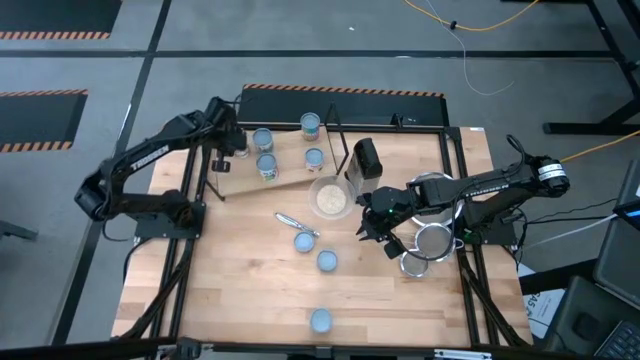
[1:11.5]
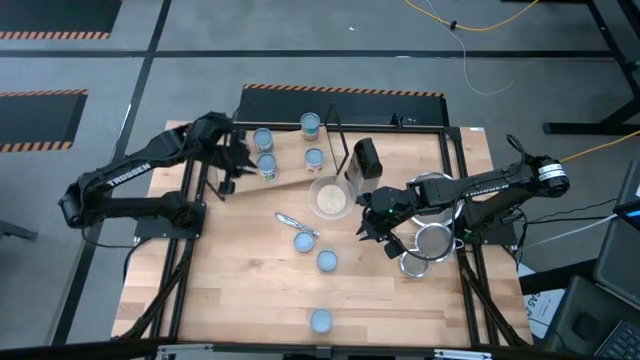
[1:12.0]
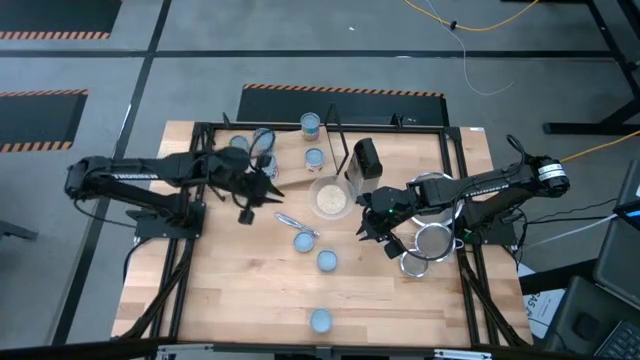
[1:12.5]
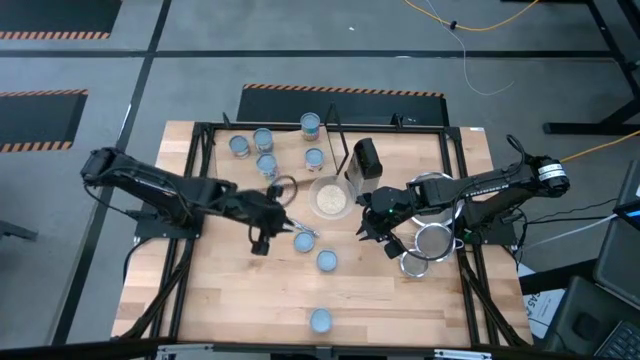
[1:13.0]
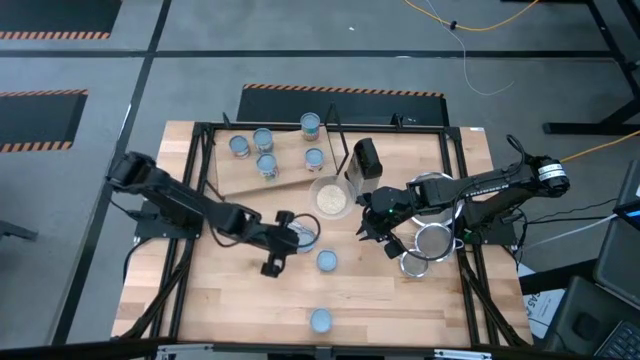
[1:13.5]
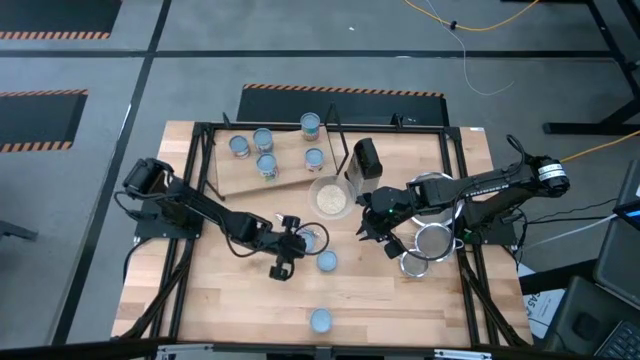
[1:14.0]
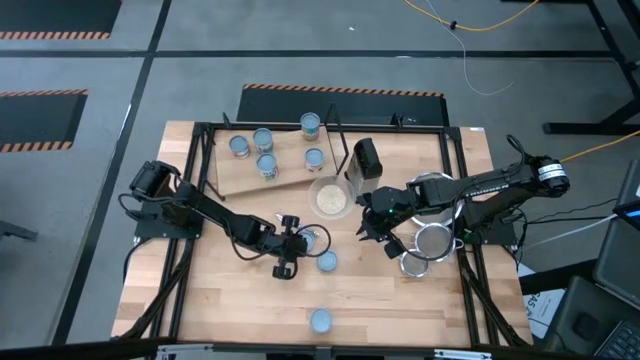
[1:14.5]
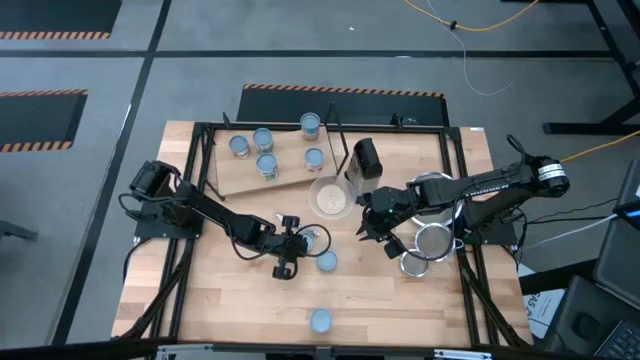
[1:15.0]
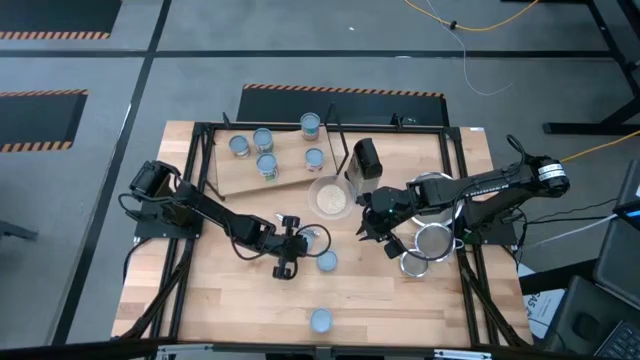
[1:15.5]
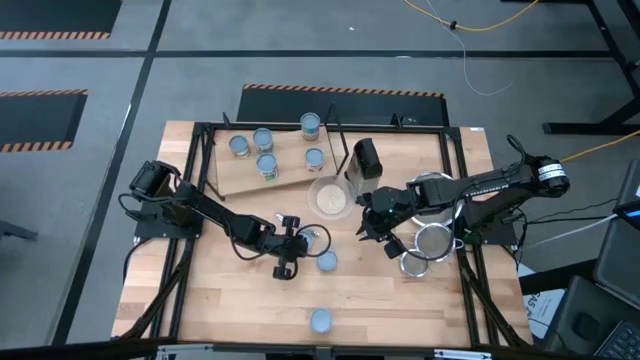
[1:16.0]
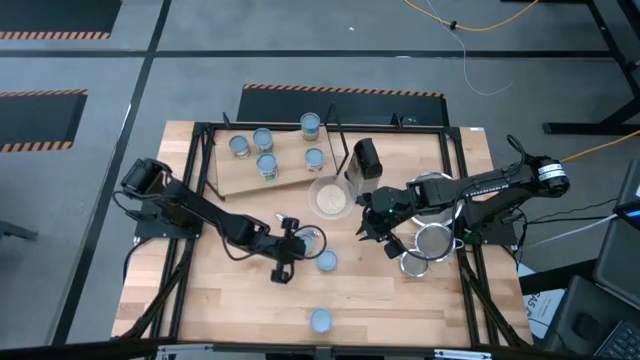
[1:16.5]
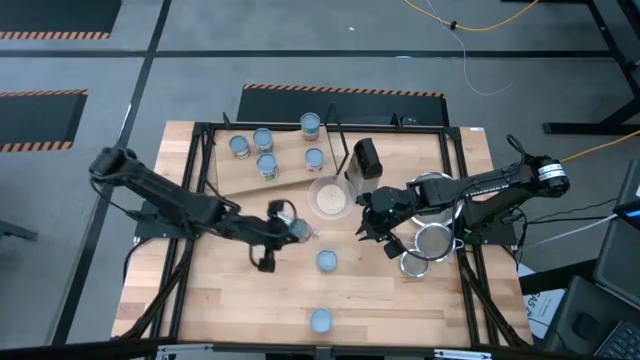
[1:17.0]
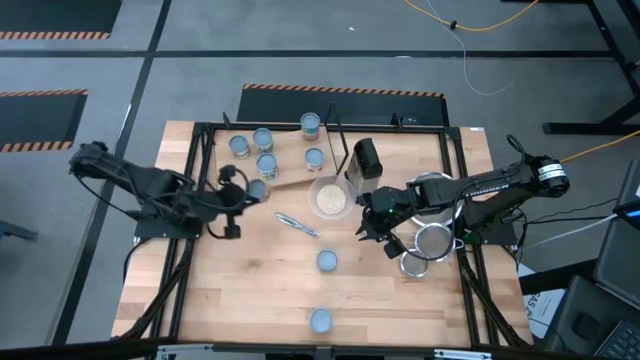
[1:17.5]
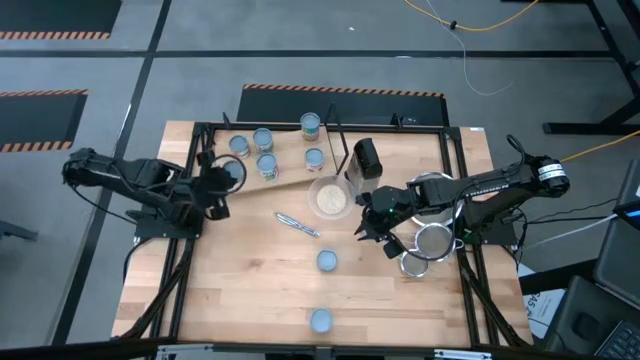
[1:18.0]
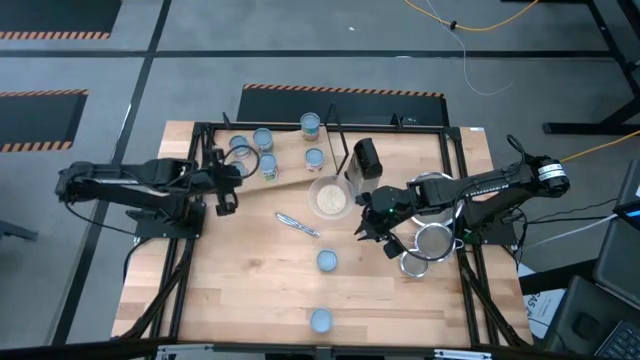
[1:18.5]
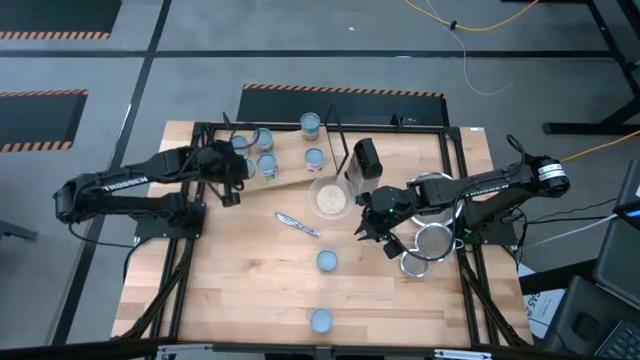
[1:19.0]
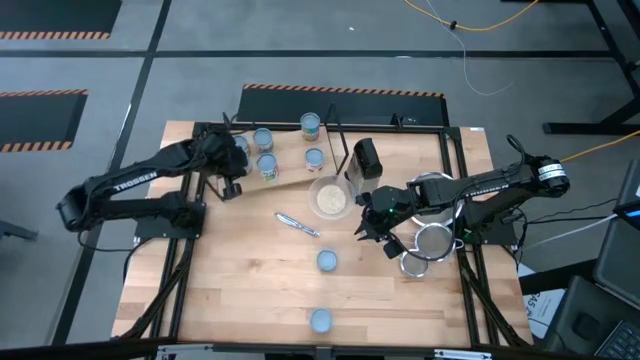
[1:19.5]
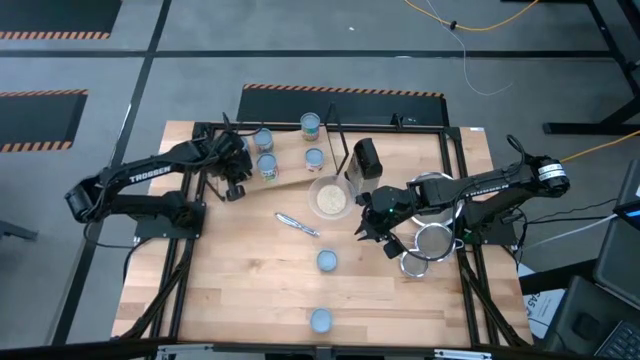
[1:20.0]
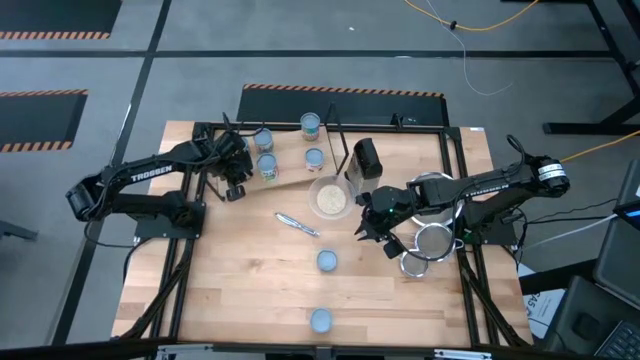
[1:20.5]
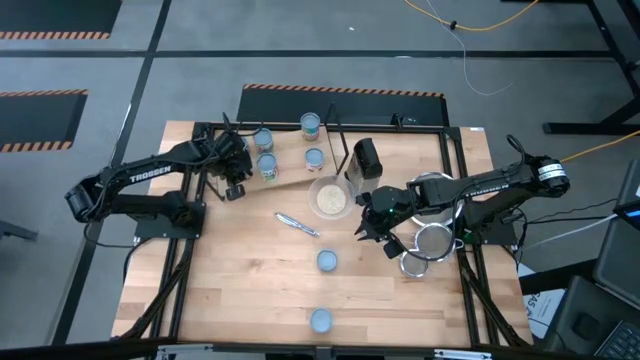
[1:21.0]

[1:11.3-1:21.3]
Task: Pick and place cans onto a shelf
Put the yellow can on the shelf aligned with the other light green

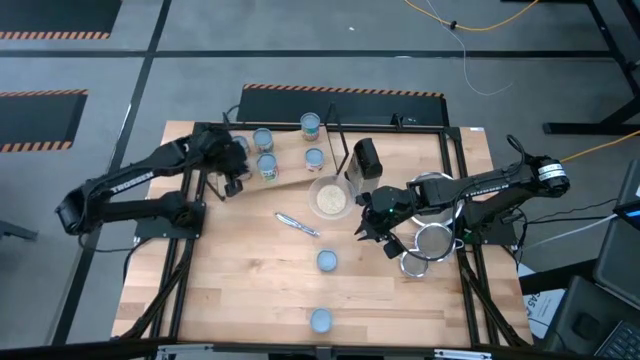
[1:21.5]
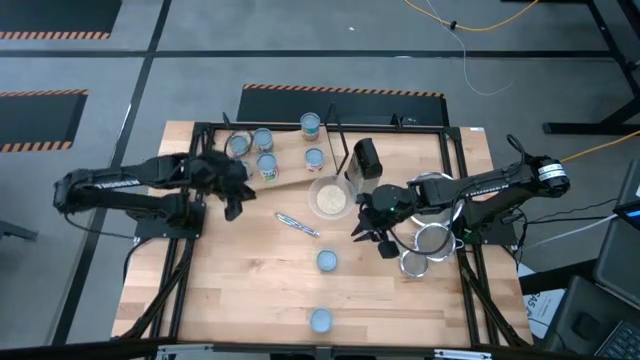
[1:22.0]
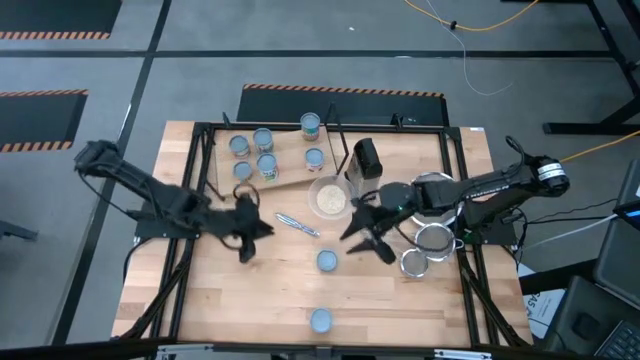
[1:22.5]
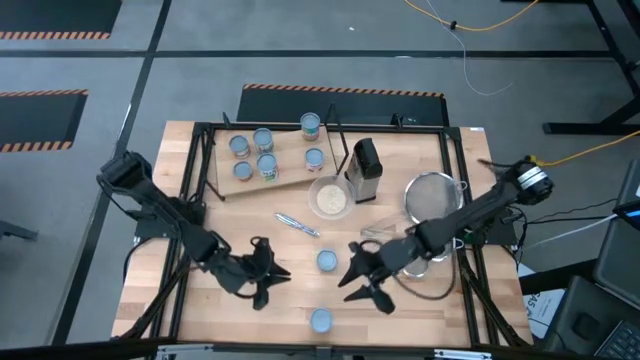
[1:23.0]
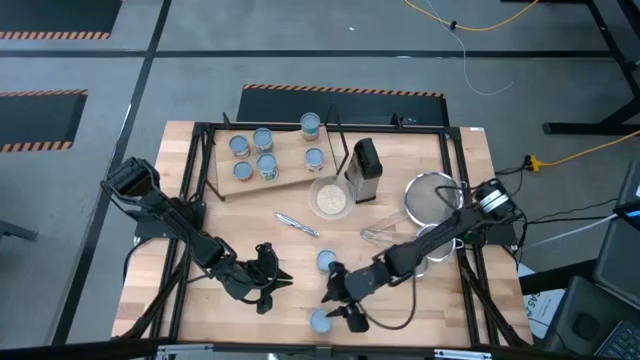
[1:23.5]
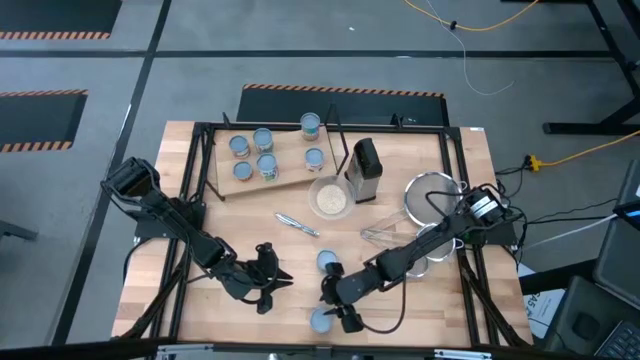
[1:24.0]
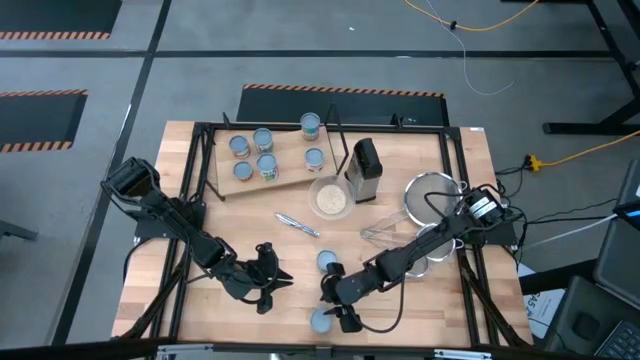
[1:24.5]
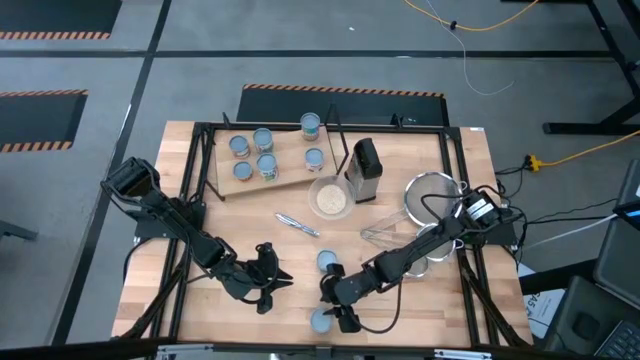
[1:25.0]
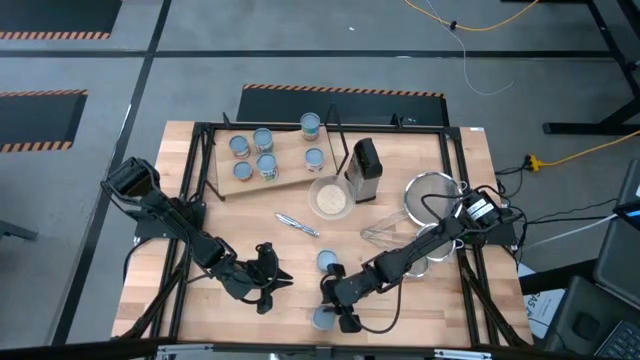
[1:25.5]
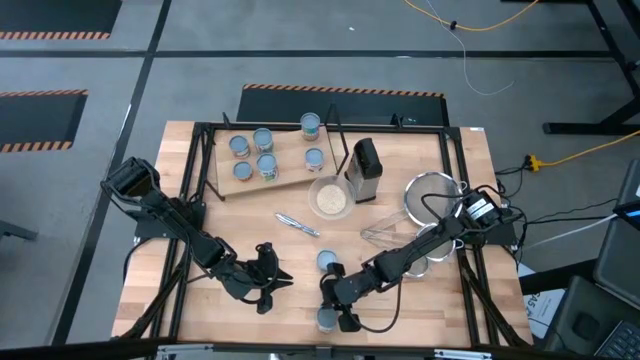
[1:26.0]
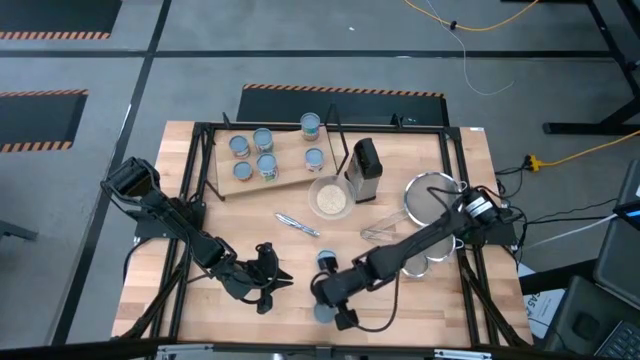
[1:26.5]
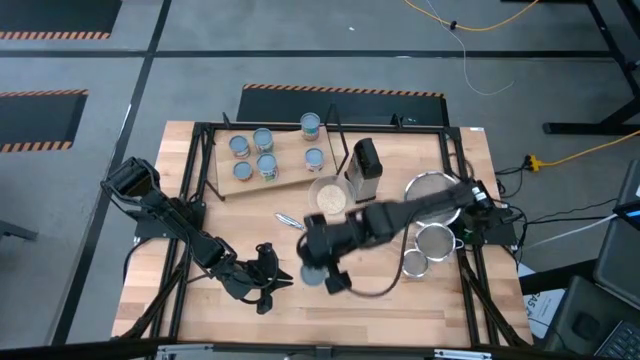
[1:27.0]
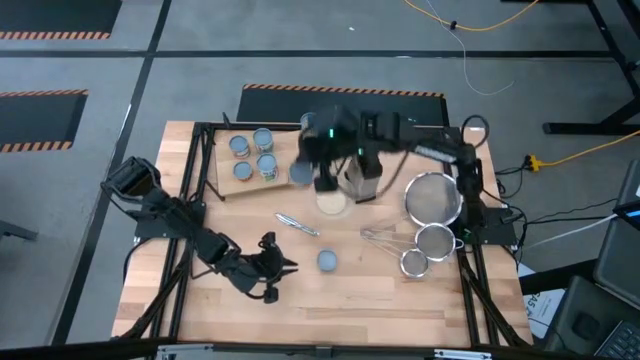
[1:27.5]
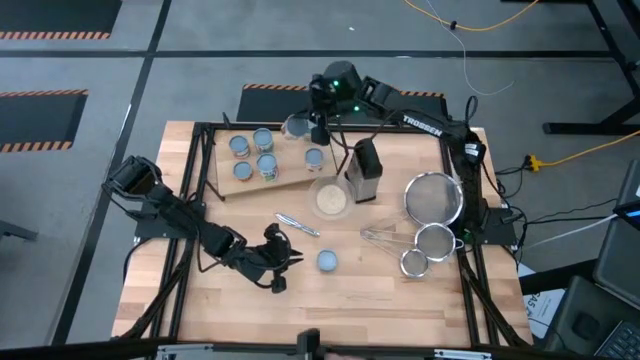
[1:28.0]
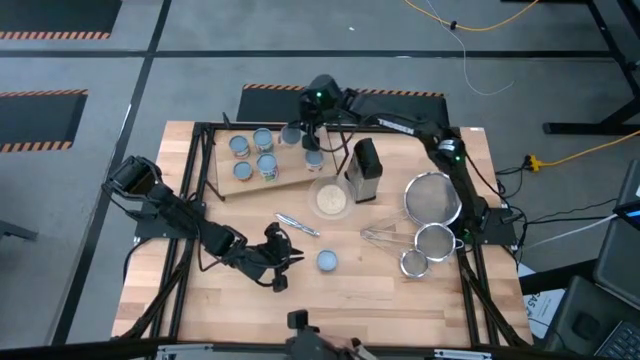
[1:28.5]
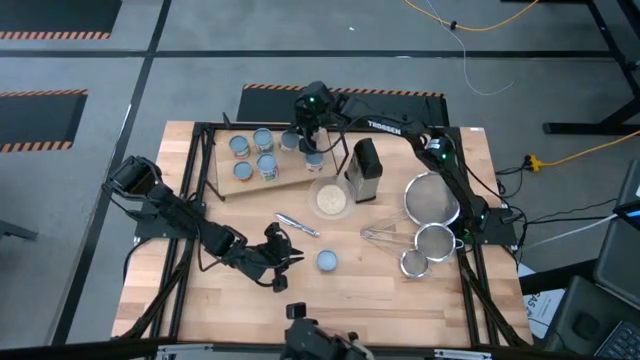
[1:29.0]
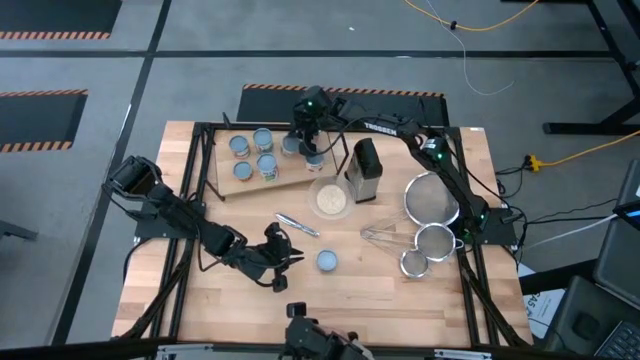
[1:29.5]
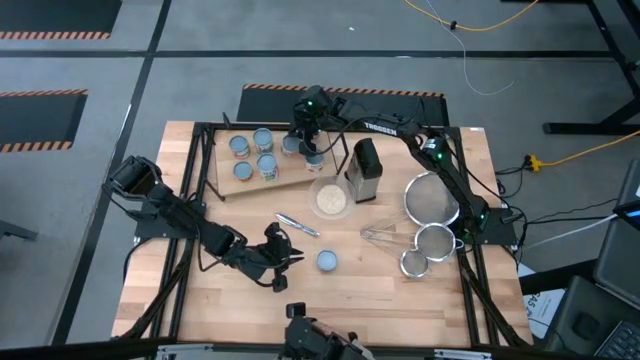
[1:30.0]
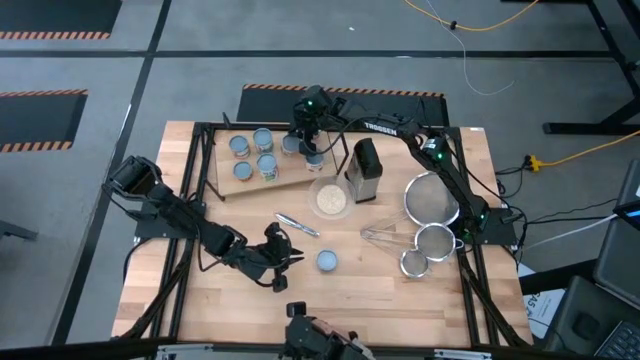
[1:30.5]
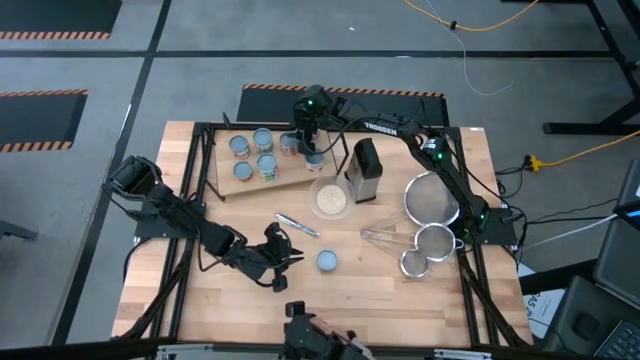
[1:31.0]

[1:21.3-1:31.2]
Put the light red can on the shelf
